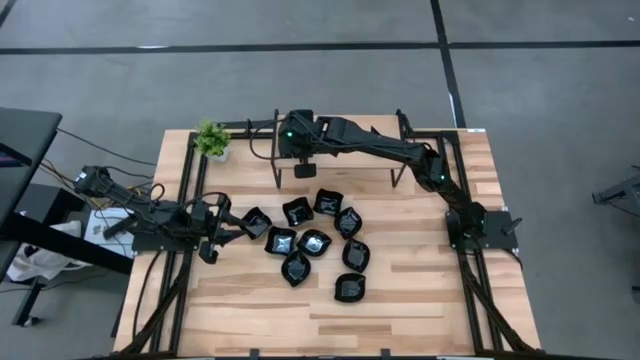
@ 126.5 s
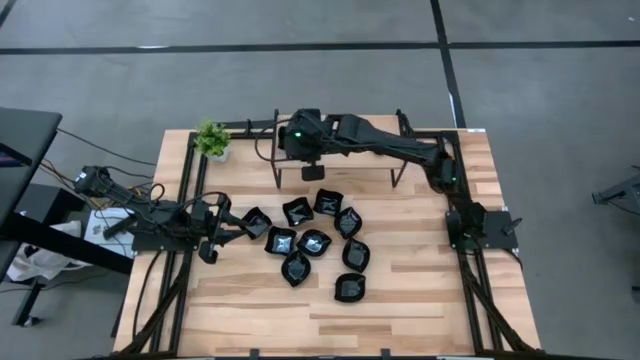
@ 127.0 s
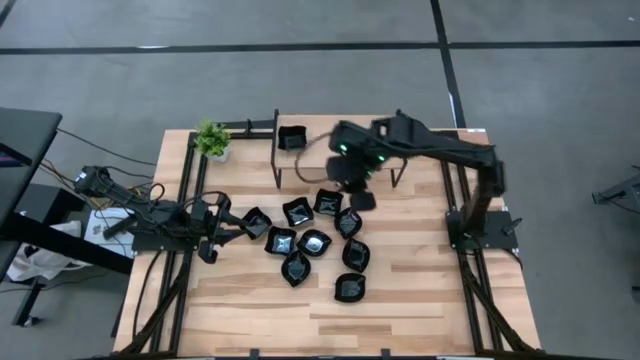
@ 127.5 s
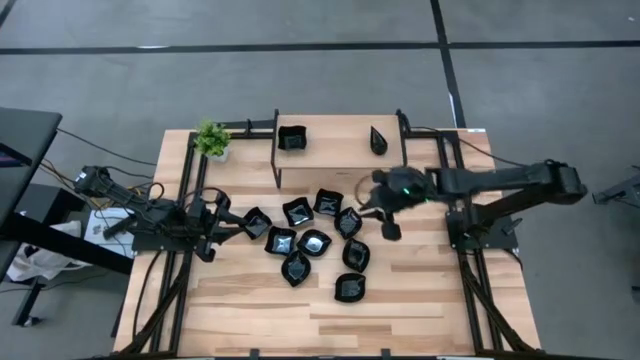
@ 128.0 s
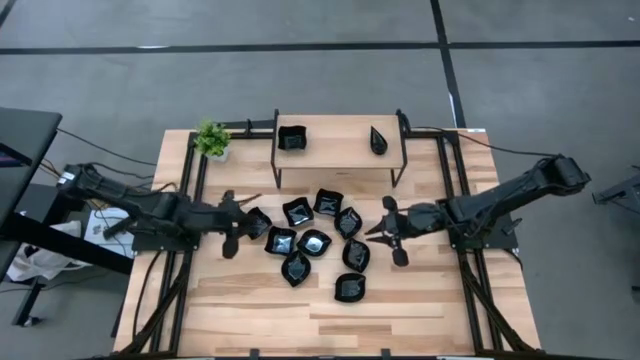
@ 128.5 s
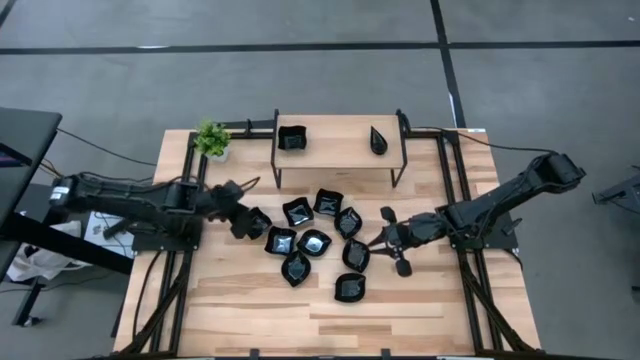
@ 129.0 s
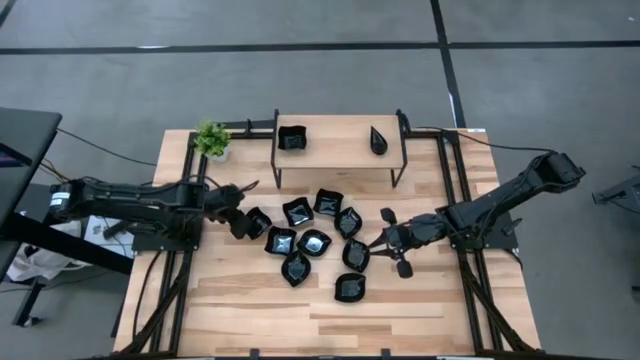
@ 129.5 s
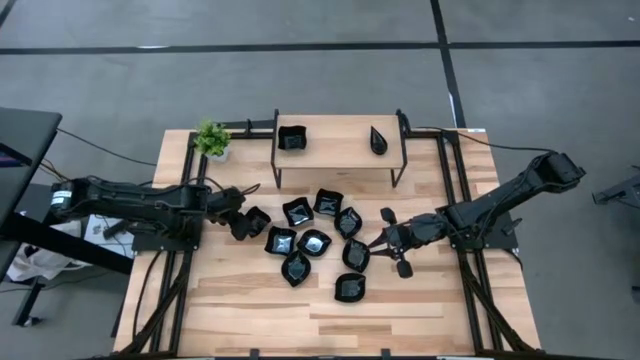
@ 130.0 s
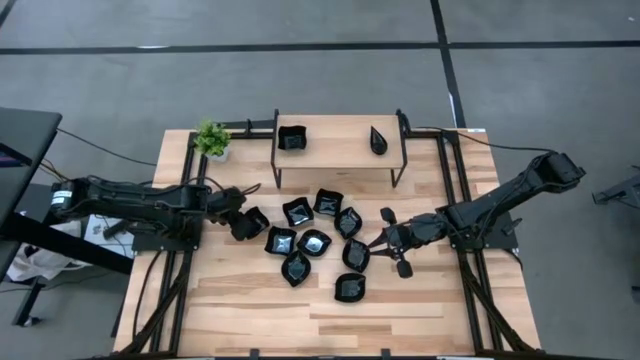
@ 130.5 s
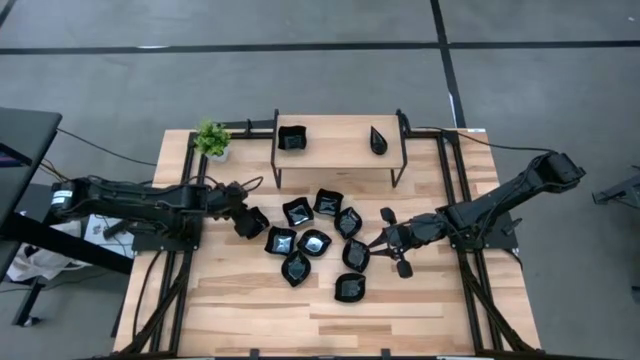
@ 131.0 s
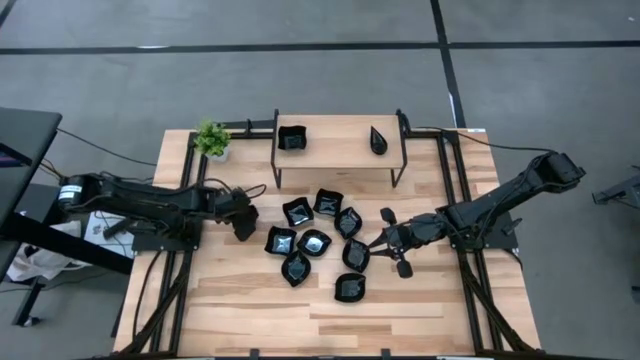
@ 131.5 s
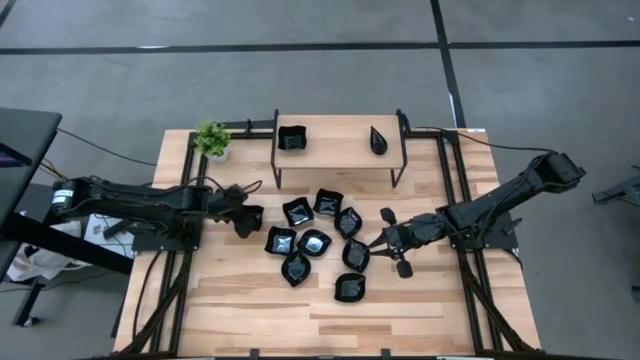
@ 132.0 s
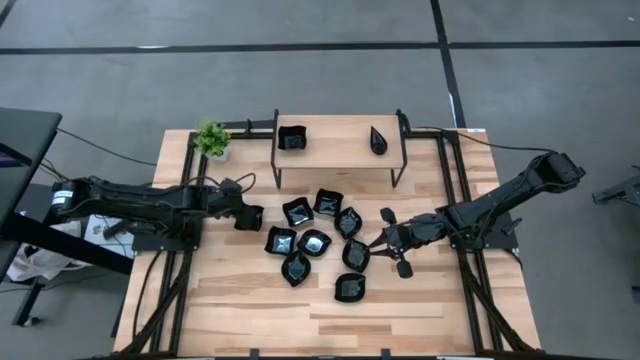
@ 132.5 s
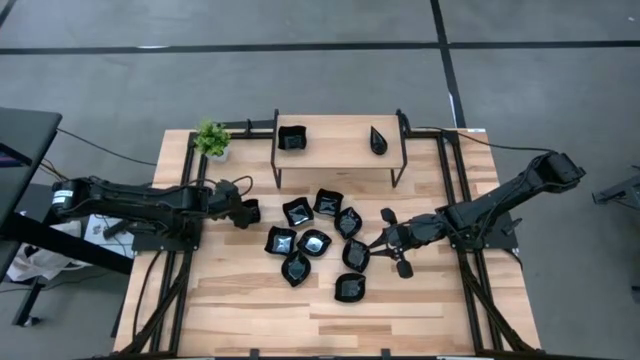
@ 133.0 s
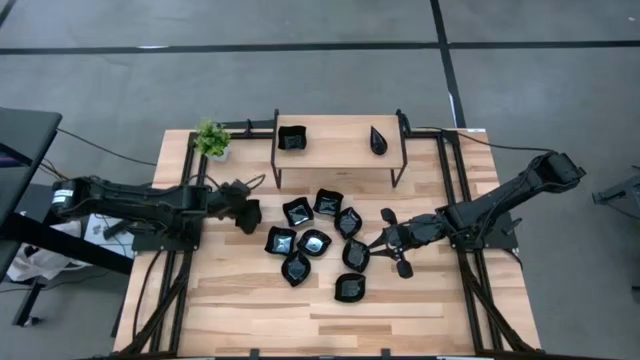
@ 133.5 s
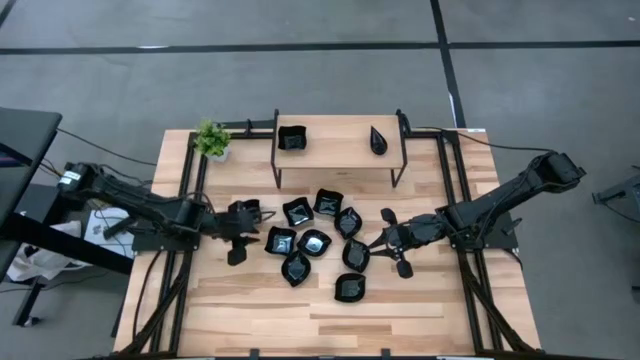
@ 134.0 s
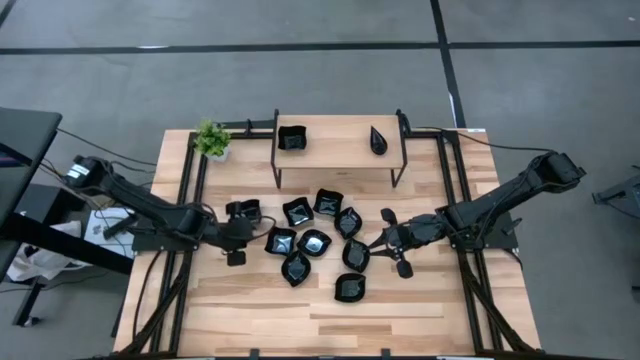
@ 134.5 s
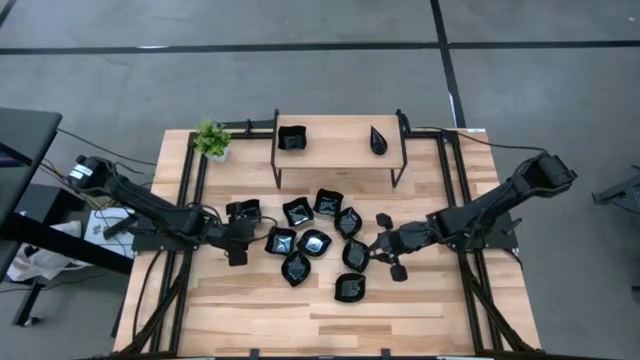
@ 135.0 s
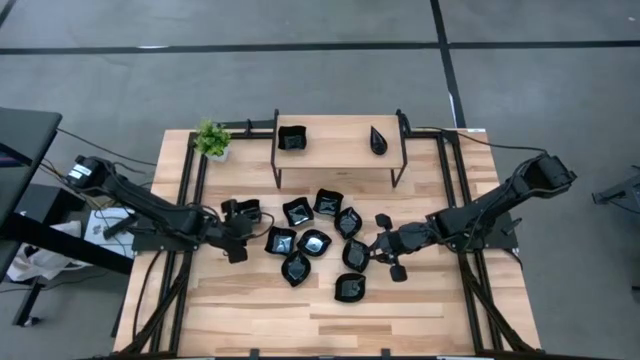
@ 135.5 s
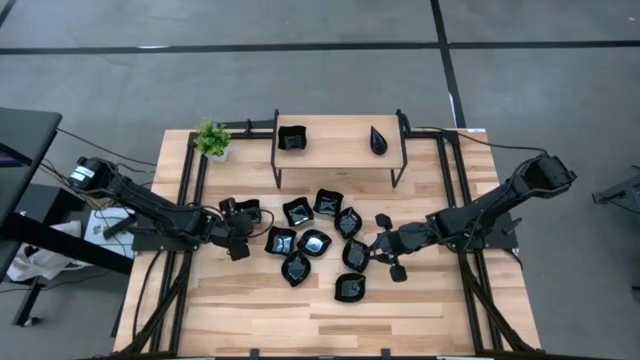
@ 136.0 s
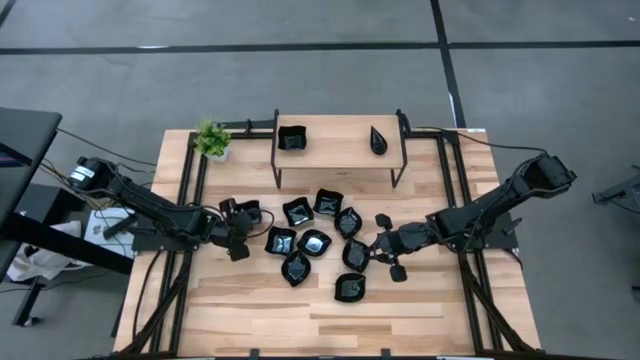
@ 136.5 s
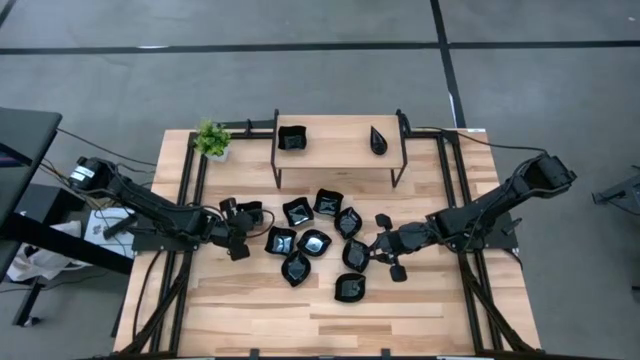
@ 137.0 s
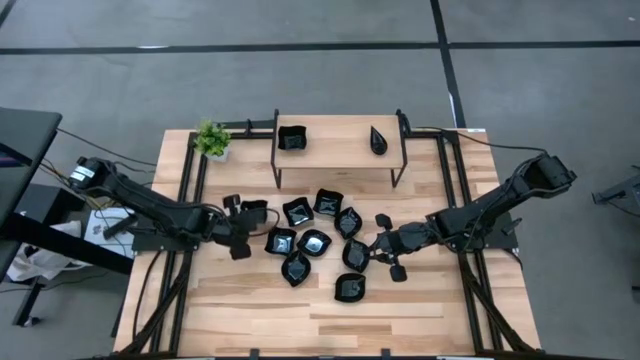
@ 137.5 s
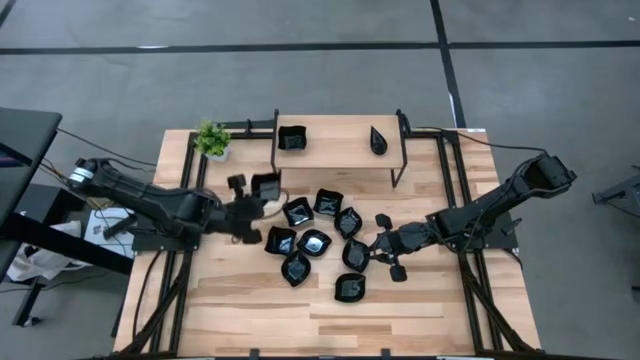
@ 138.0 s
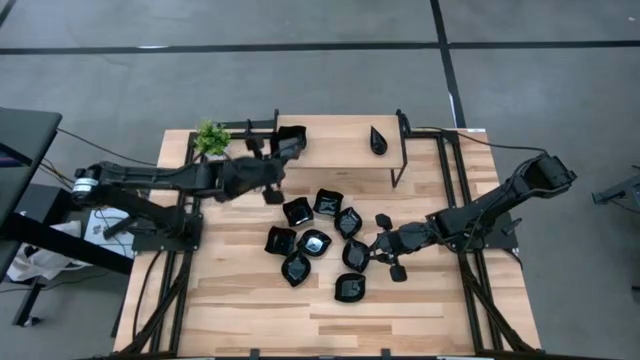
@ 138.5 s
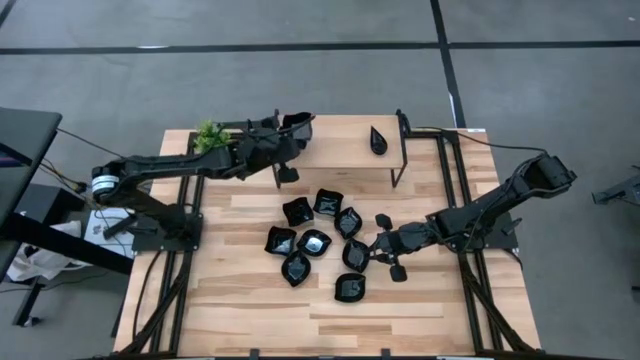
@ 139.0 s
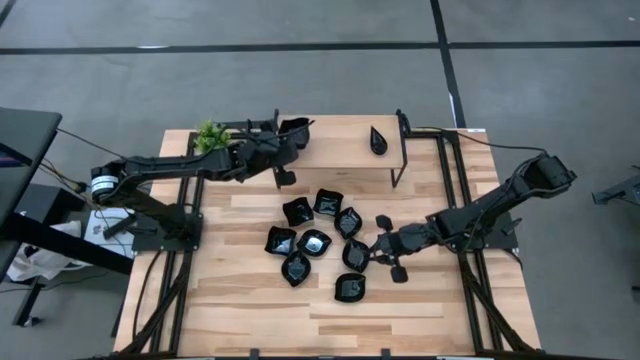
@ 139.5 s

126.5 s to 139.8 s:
Task: Pick & Place Mini shaped plates
Stack the black distorted square plate on top of the black distorted square plate on the shelf

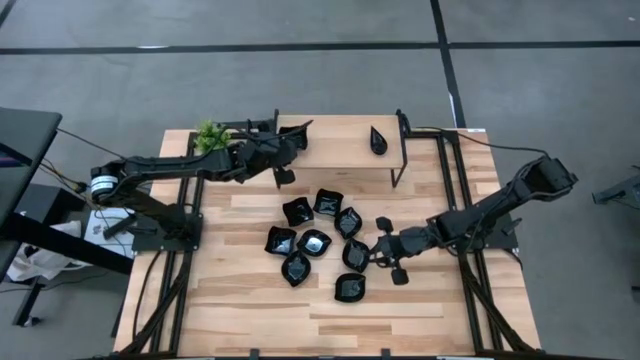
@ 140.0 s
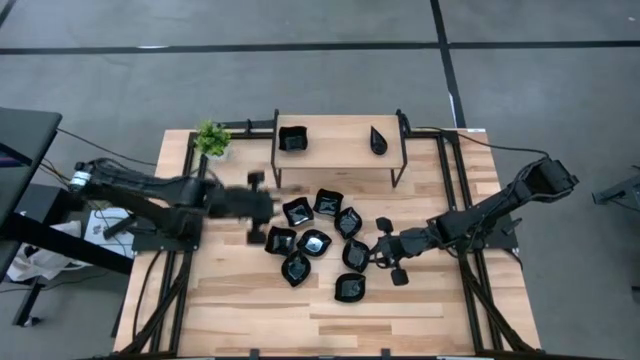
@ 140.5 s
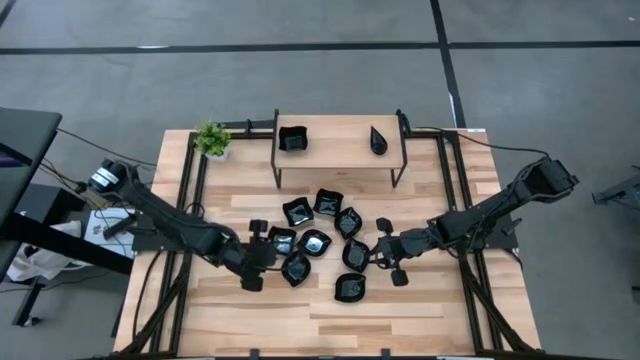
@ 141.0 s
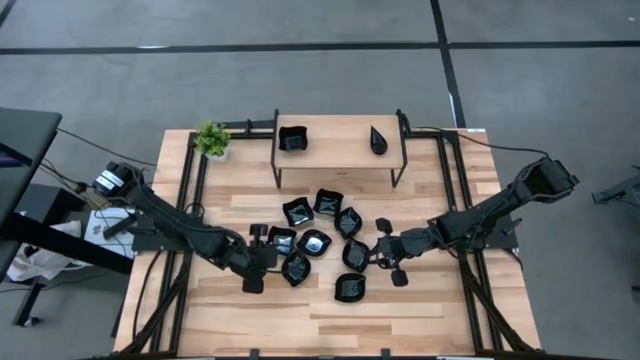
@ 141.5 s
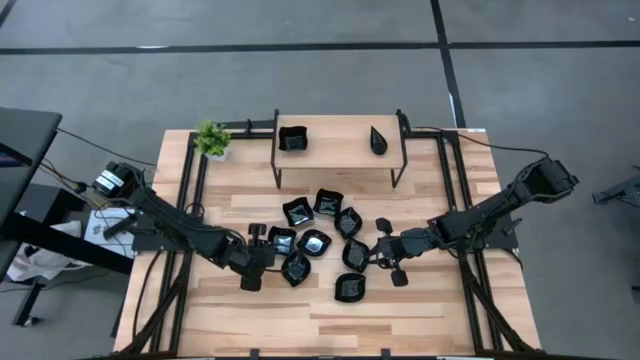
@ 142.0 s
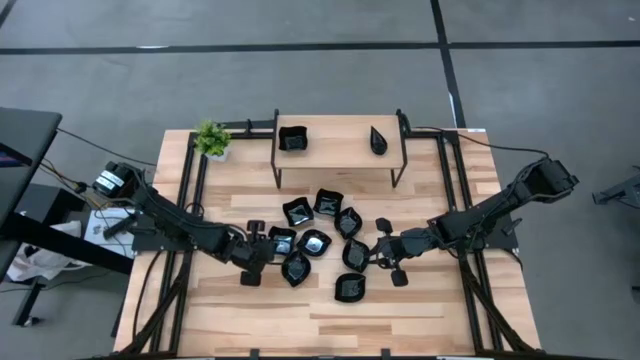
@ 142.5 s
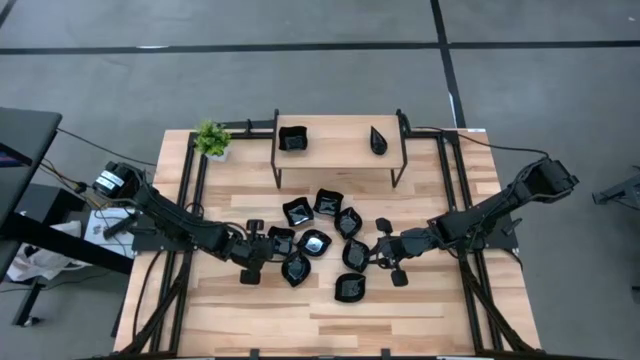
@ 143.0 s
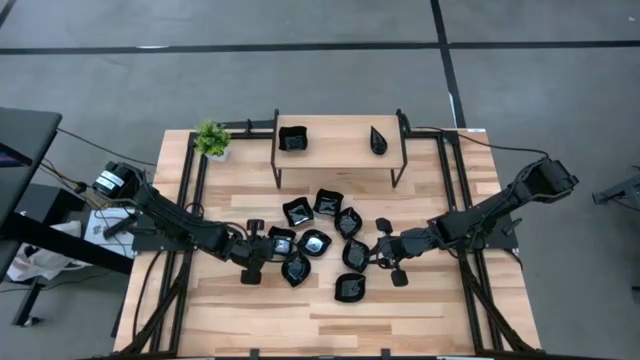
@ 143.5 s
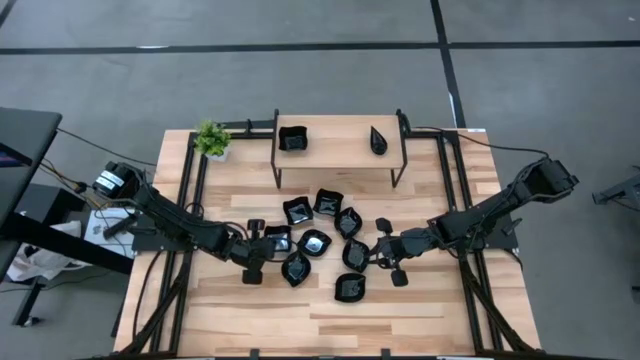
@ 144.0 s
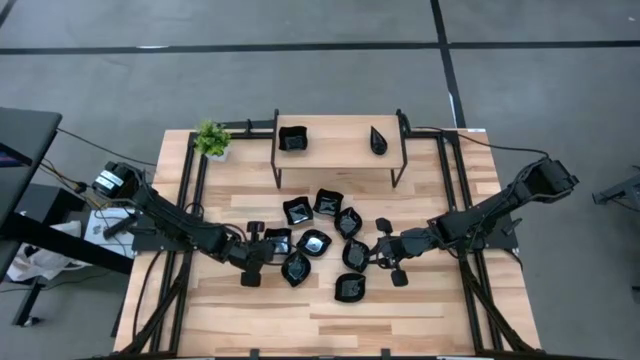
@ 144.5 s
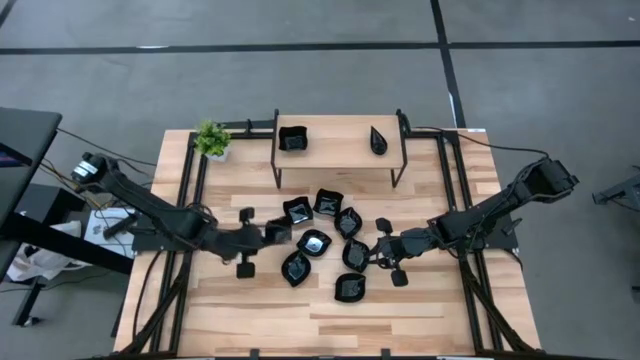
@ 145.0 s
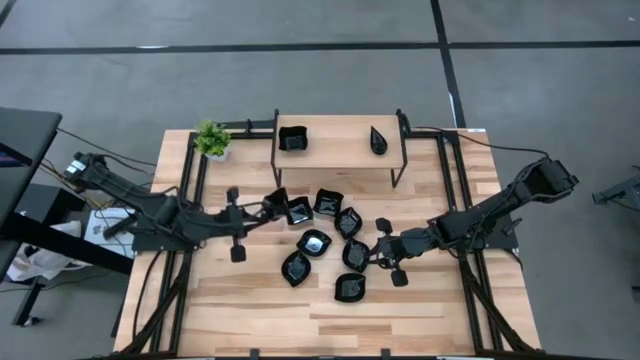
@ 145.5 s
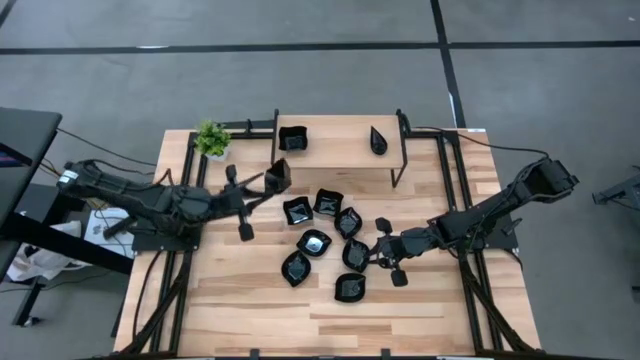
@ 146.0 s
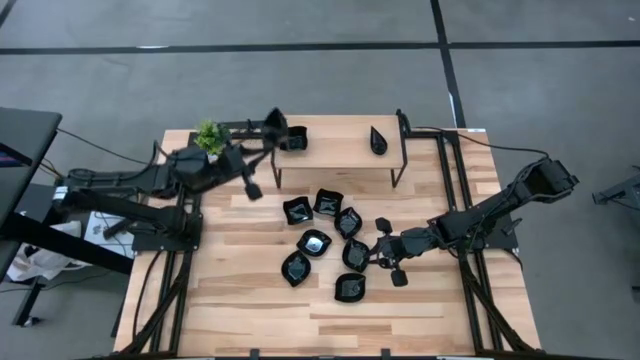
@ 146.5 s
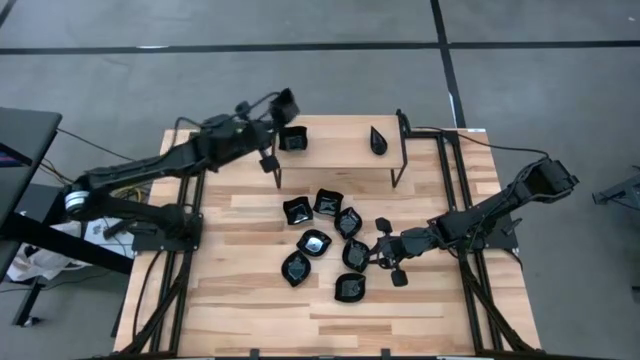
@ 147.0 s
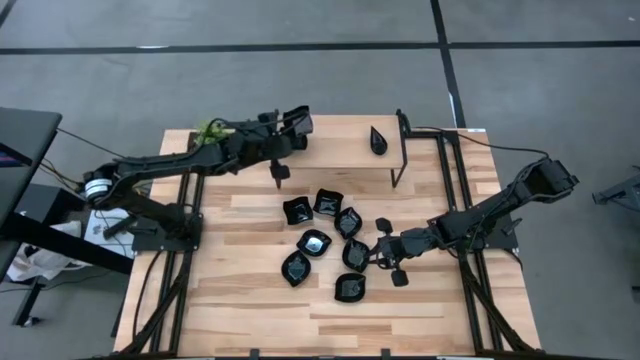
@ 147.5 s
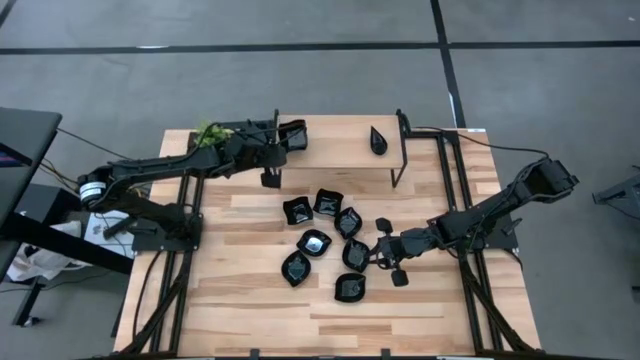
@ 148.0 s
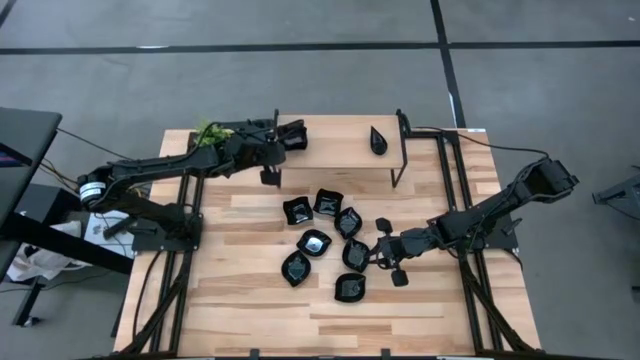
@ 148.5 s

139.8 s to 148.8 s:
Stack the black distorted square plate on top of the black distorted square plate on the shelf
